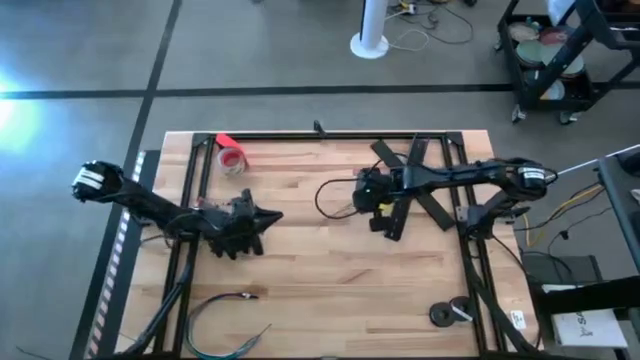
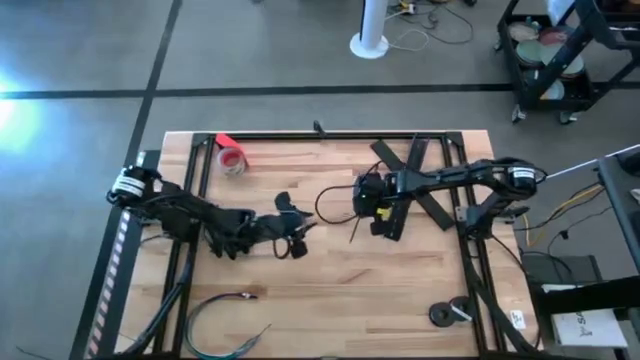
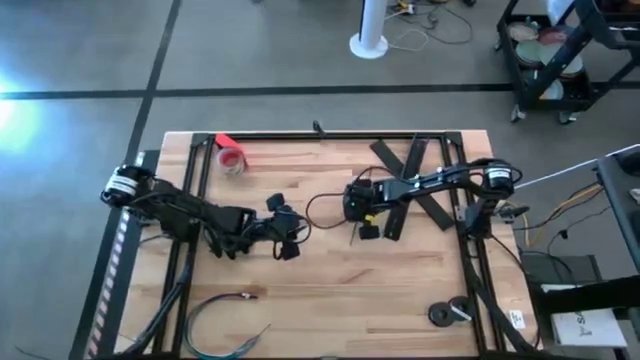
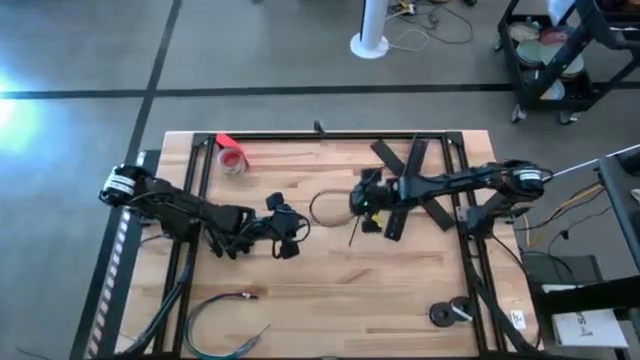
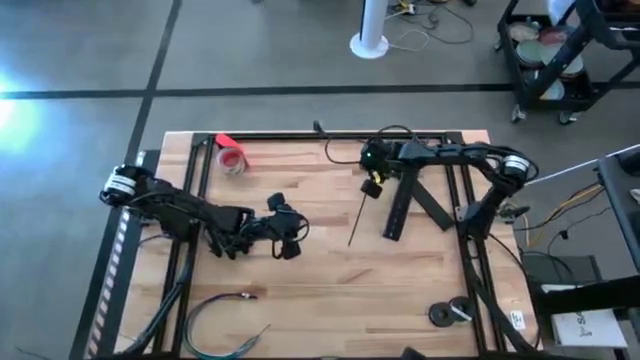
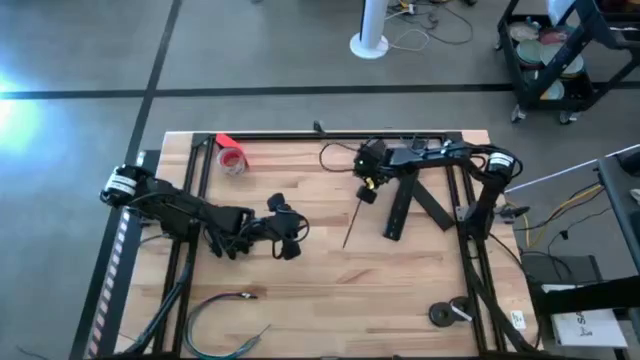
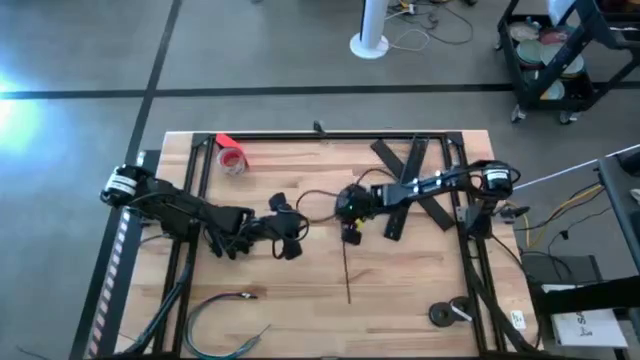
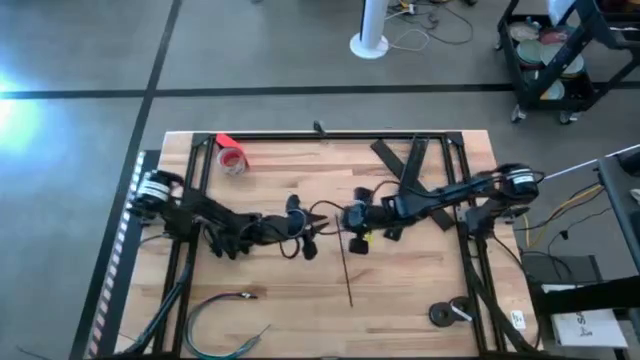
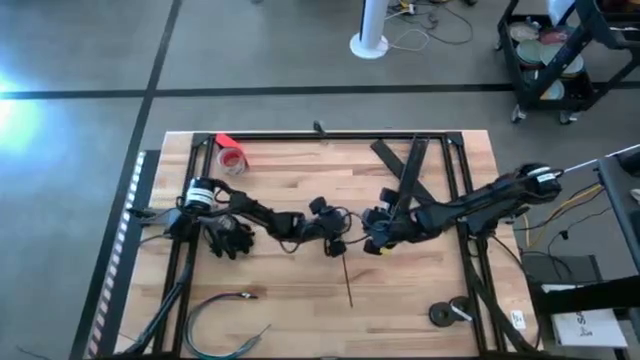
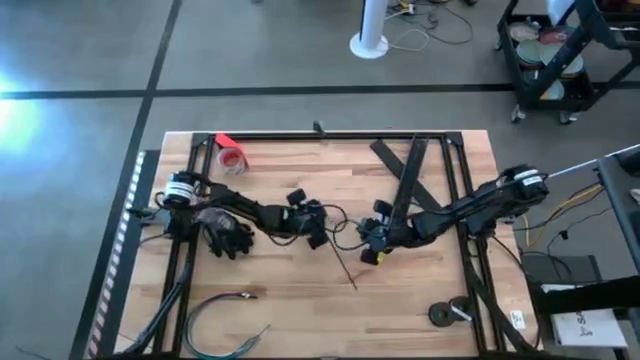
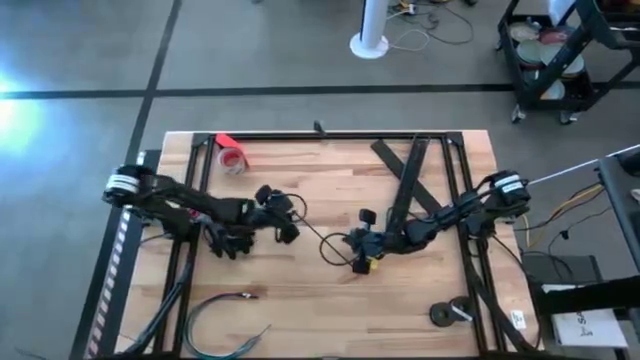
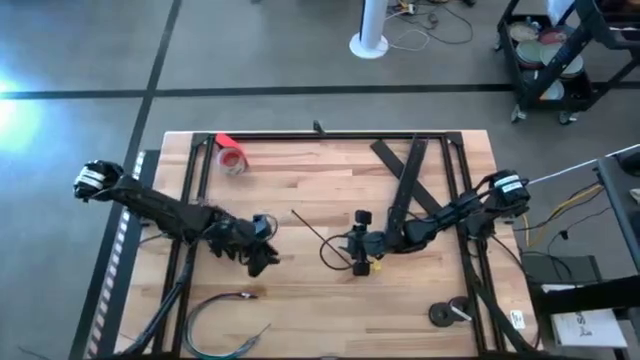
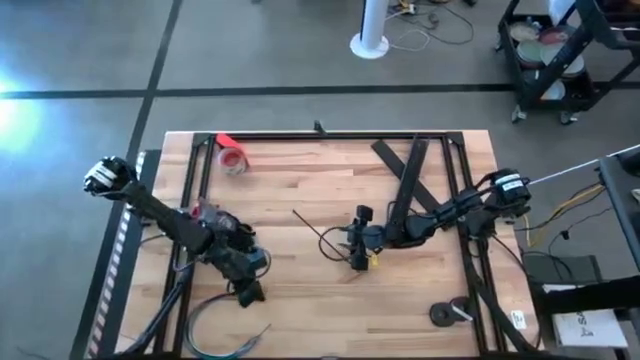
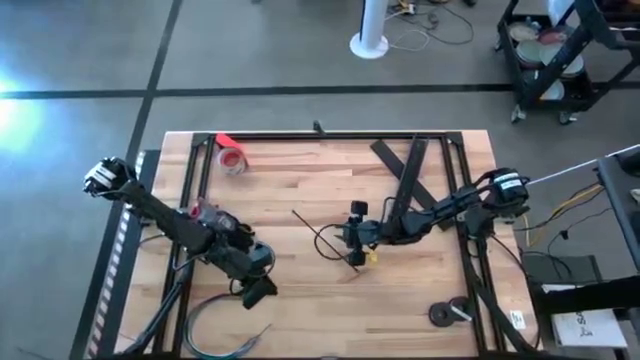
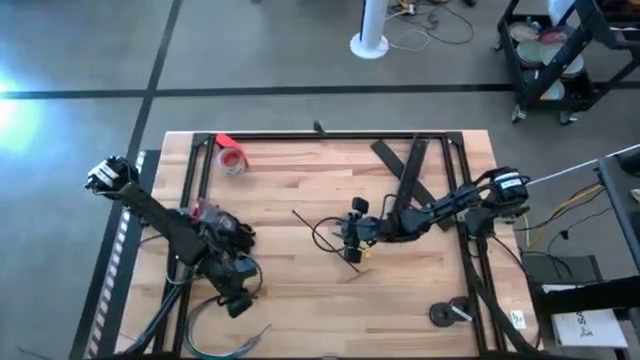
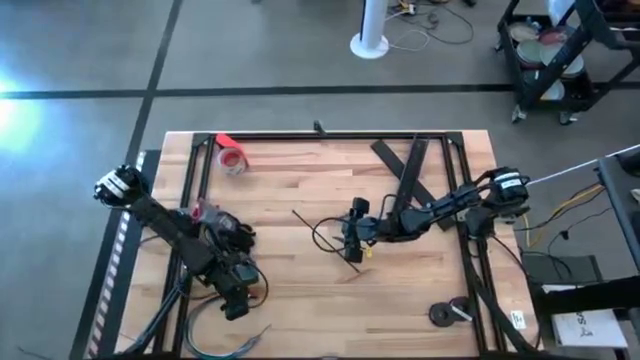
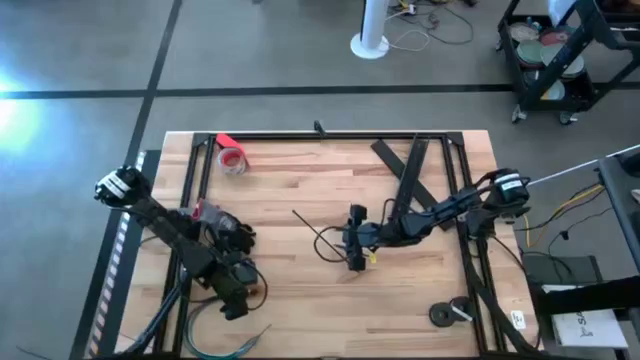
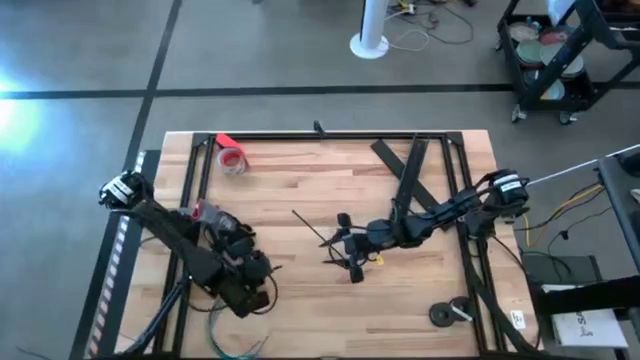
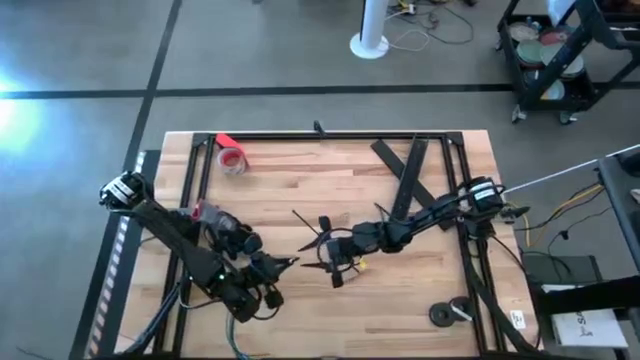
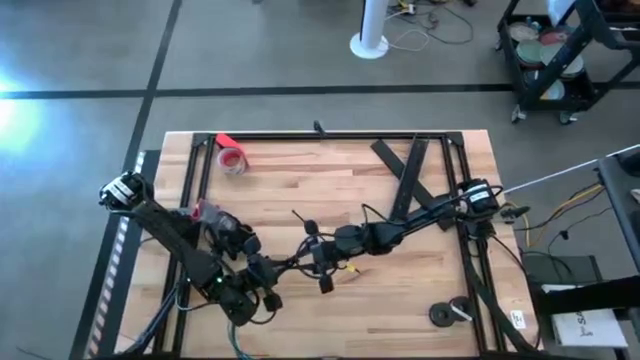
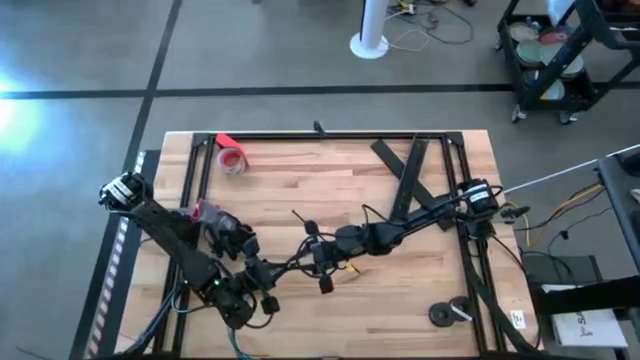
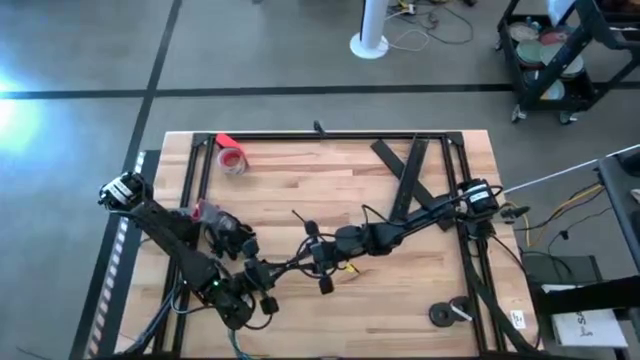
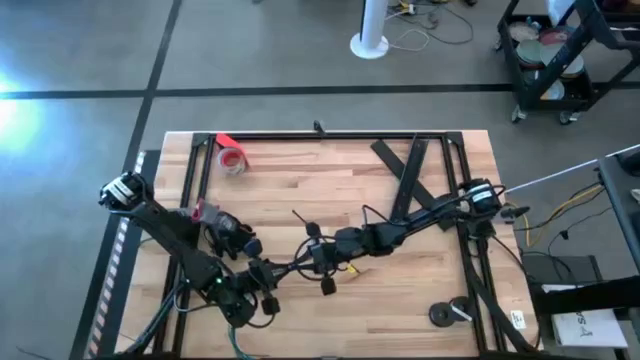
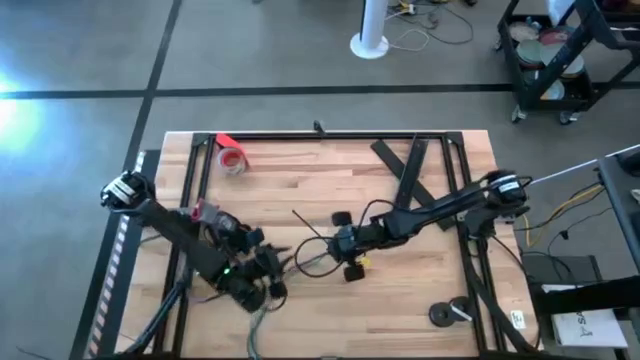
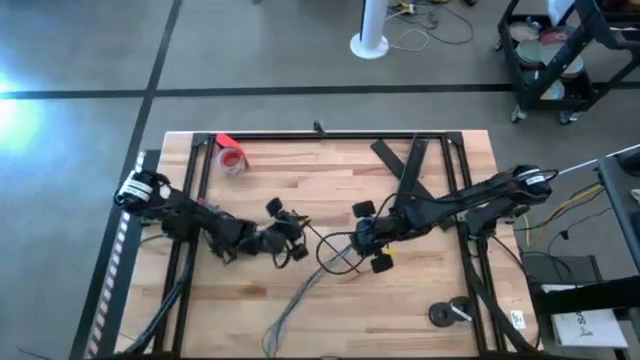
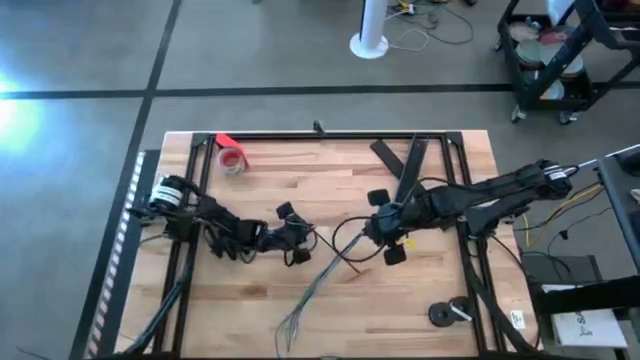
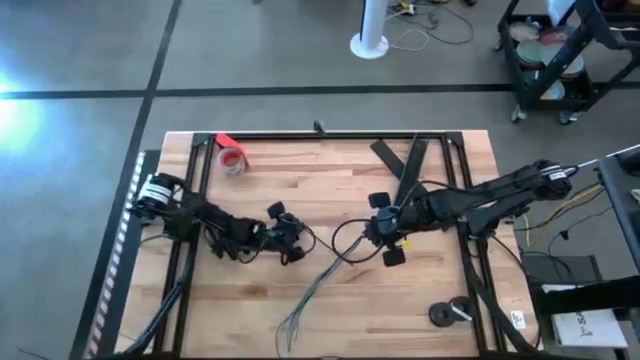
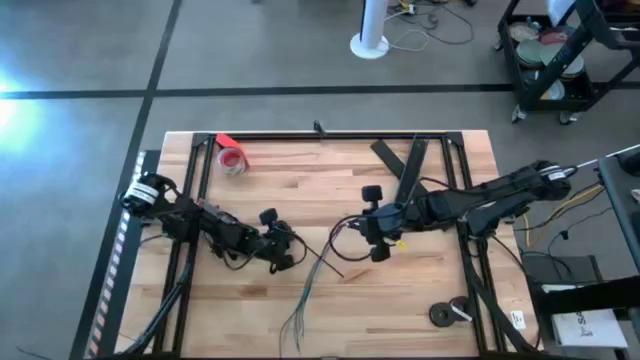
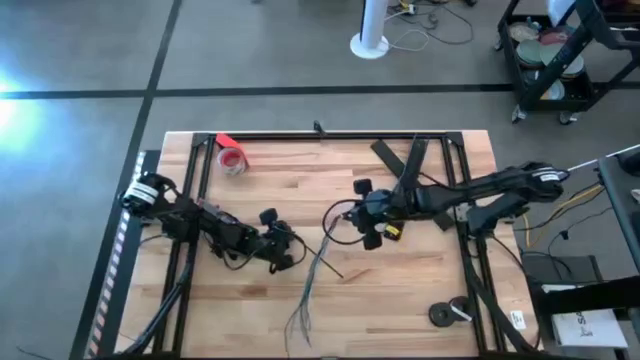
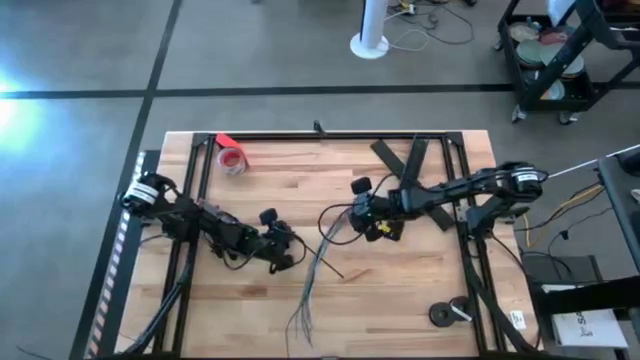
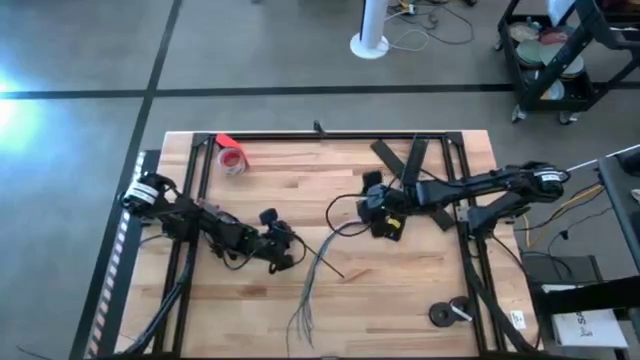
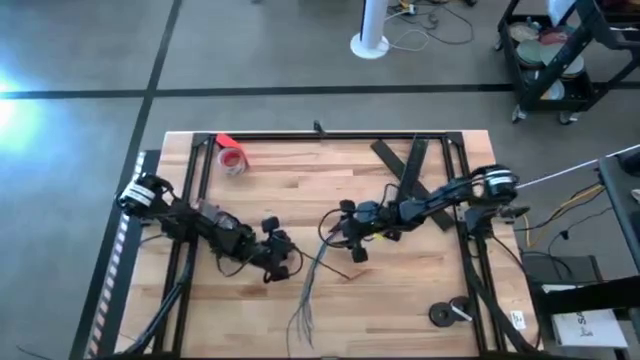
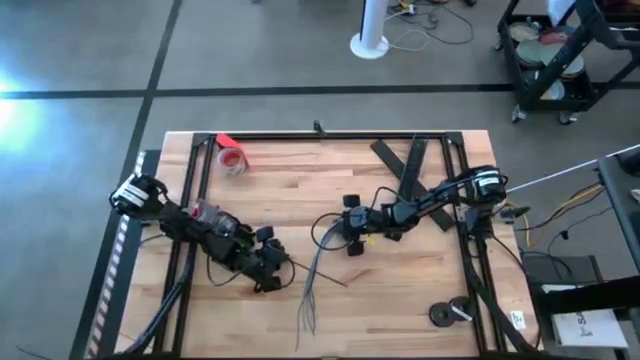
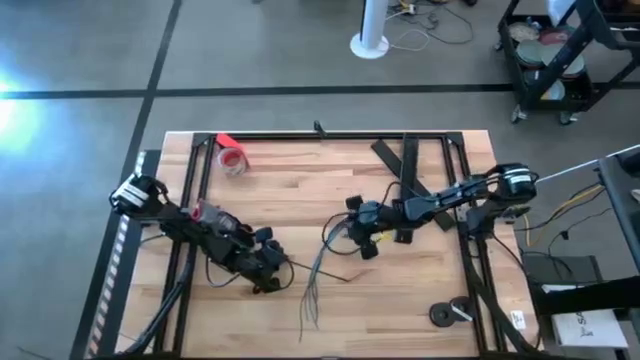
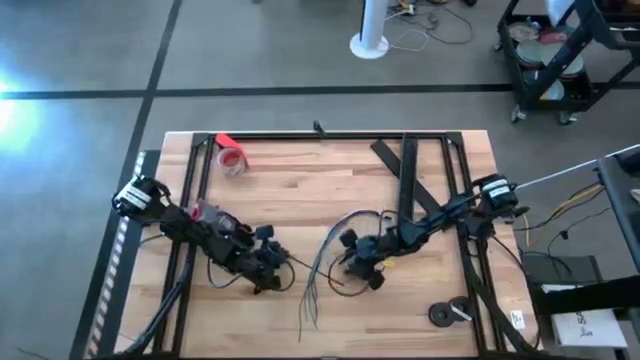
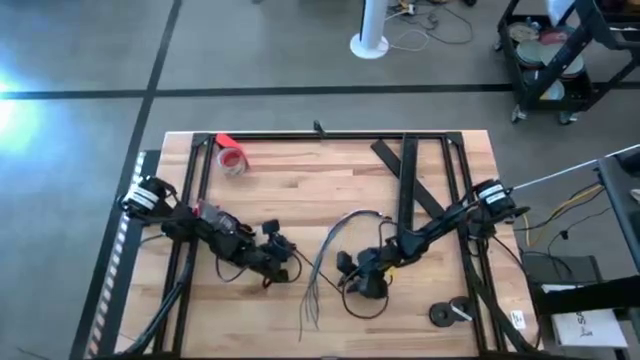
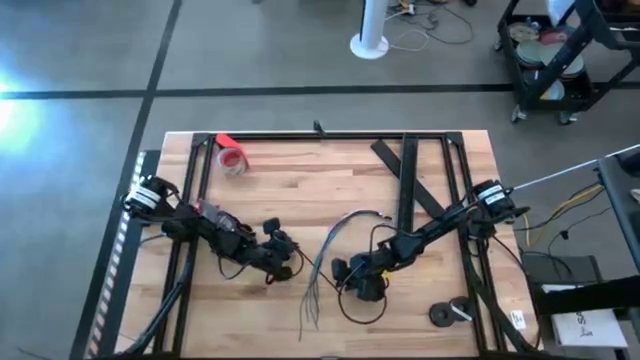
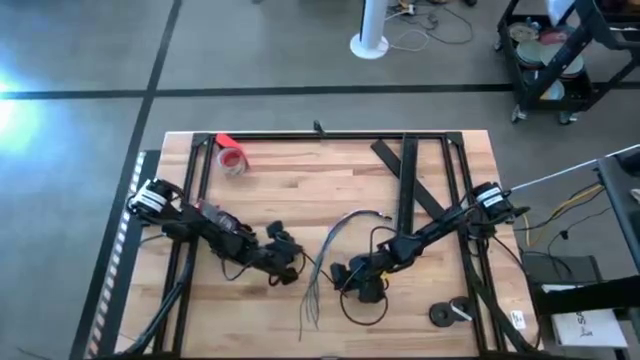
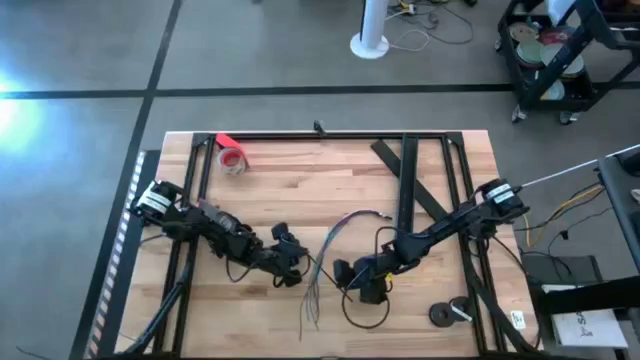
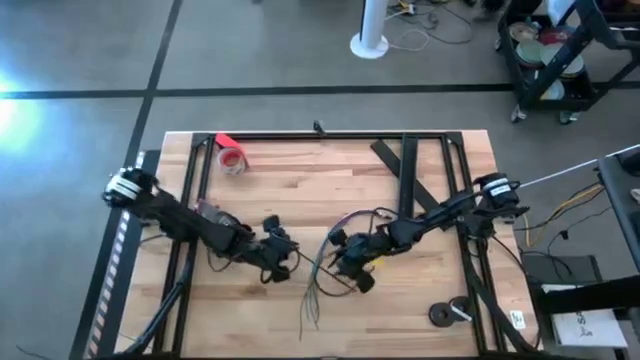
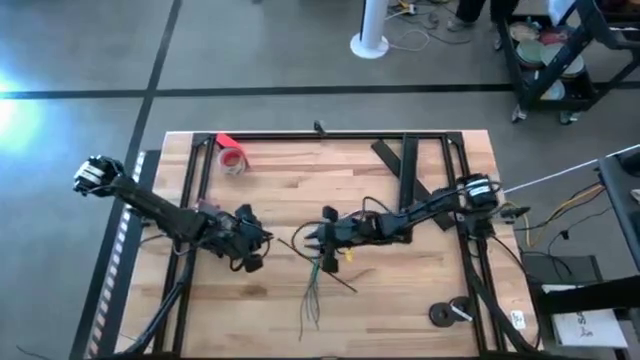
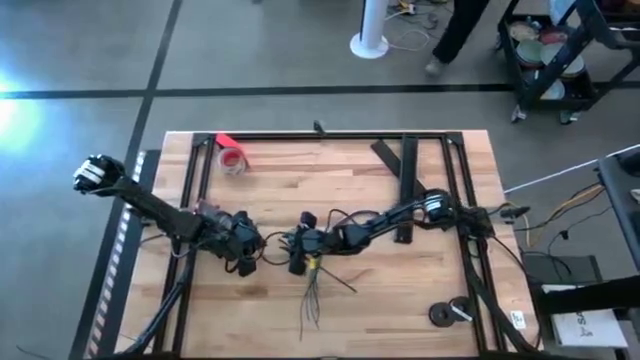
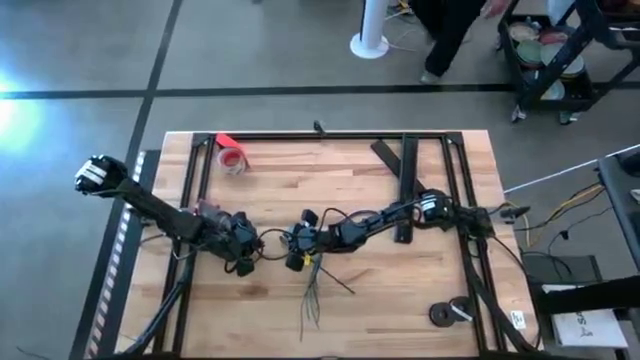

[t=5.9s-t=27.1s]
Task: Ziptie cables
Wrap the zip tie around the cable bundle
